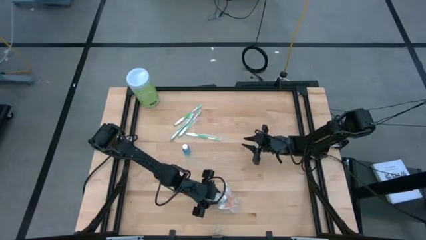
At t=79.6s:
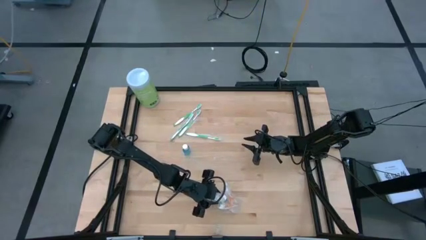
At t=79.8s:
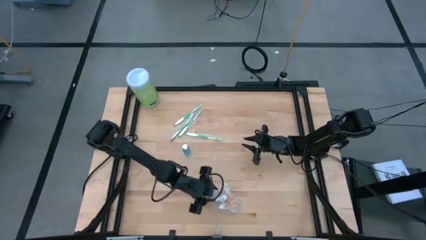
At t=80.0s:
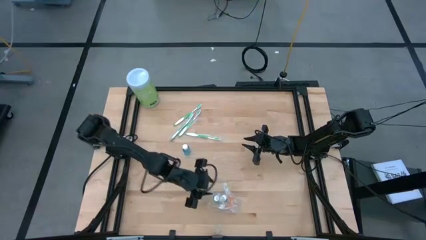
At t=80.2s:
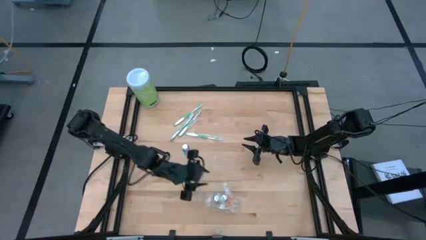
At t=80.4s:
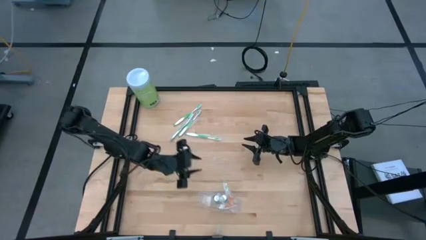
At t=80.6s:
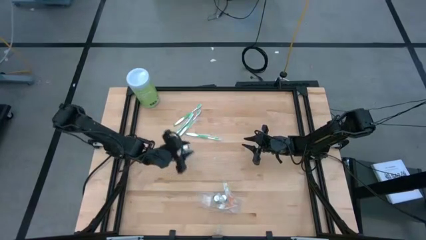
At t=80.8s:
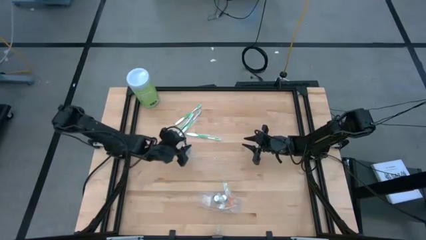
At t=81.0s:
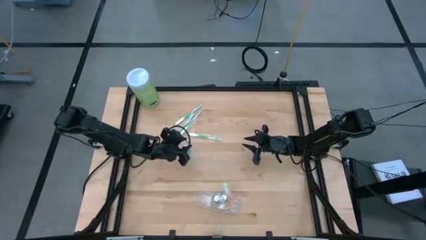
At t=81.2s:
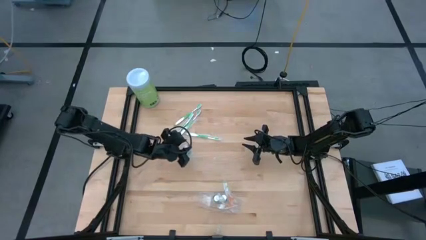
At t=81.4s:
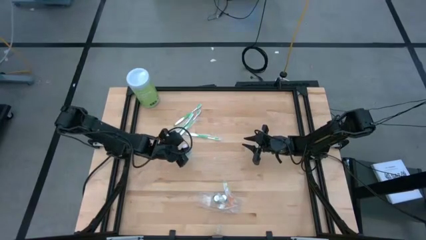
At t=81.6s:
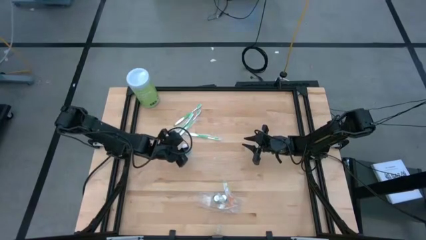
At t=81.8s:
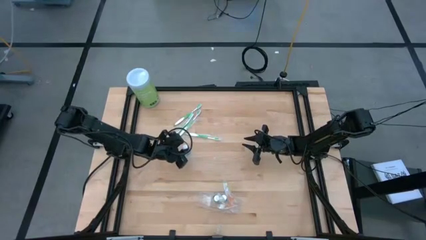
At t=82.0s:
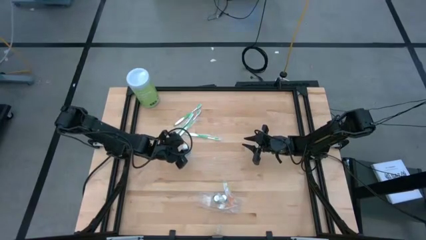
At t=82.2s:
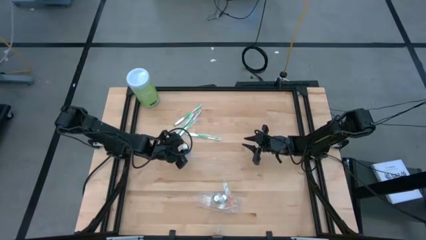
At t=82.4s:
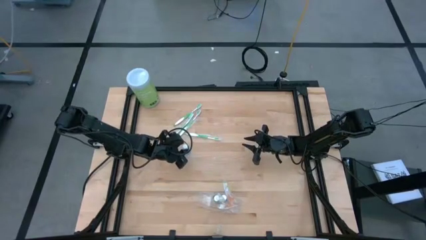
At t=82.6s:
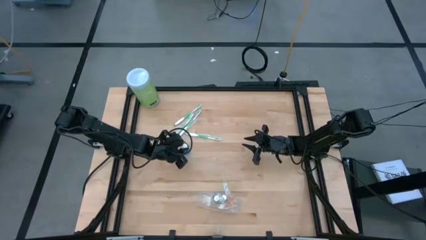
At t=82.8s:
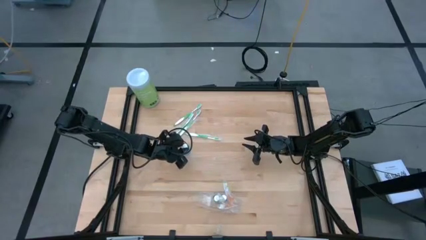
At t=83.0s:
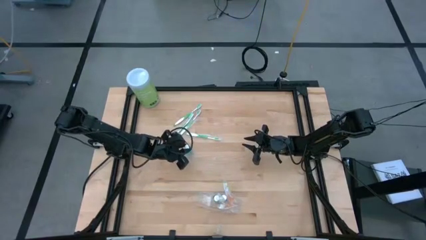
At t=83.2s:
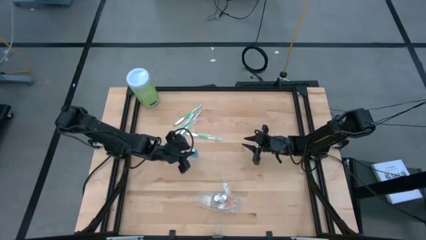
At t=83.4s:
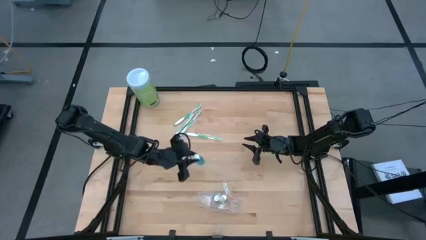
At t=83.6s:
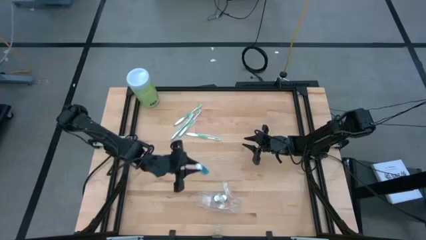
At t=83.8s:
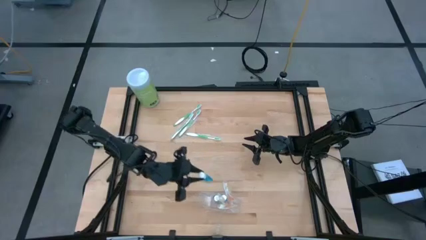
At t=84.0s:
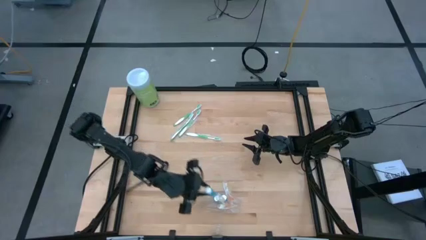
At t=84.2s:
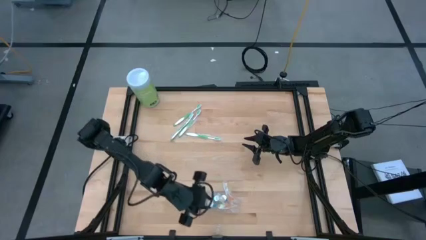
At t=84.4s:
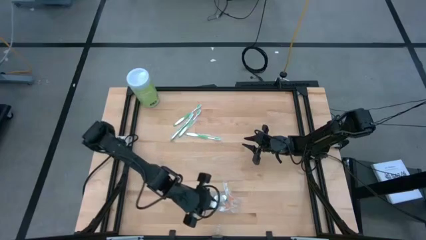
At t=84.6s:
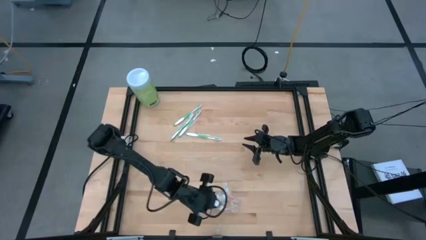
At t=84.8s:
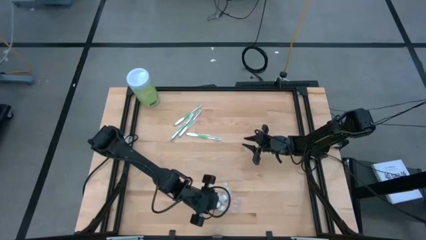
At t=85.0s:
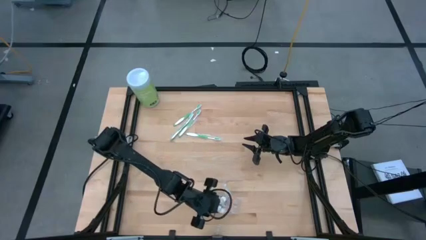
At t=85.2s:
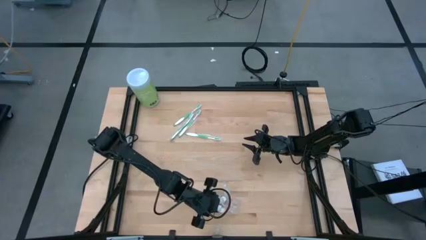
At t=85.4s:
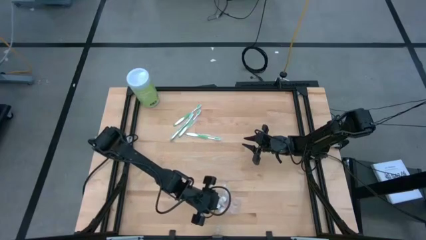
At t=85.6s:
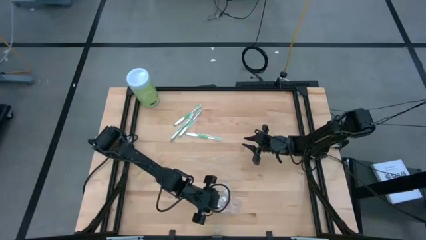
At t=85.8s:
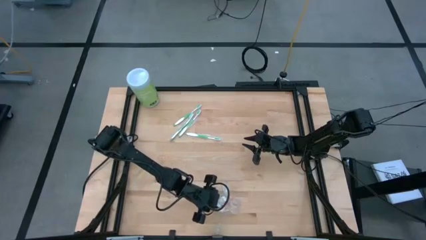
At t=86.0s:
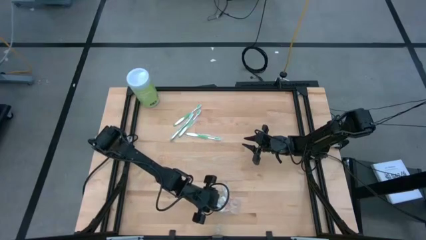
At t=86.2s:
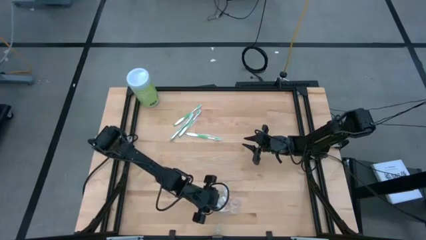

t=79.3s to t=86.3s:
Task: Pick & Place toothbrushing station
Put the mouthwash bottle into the transparent organizer

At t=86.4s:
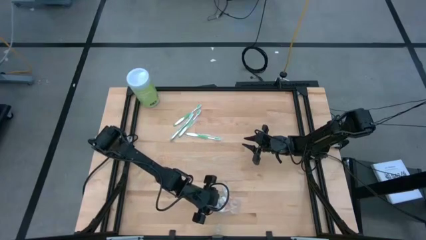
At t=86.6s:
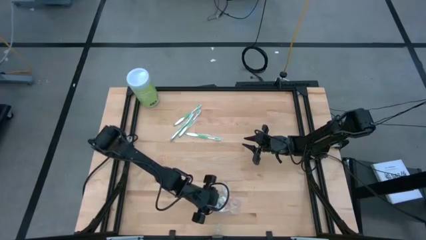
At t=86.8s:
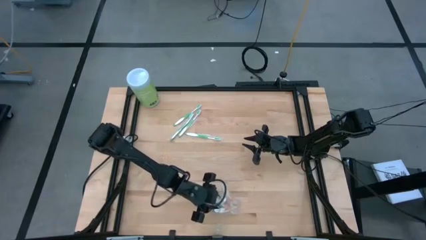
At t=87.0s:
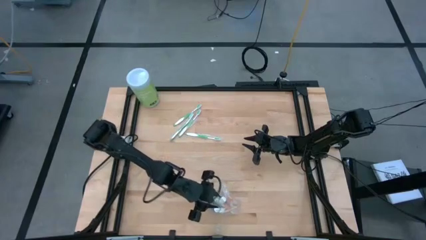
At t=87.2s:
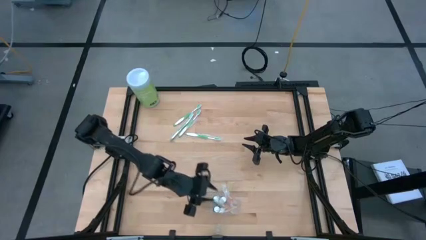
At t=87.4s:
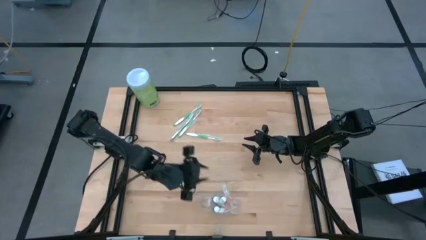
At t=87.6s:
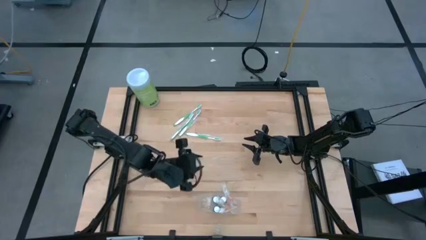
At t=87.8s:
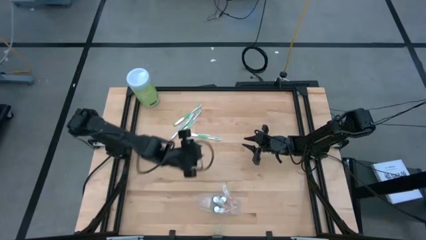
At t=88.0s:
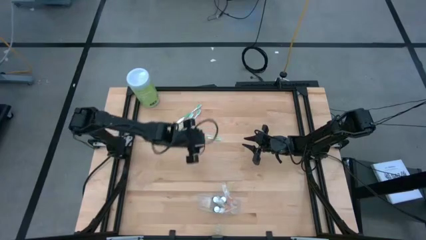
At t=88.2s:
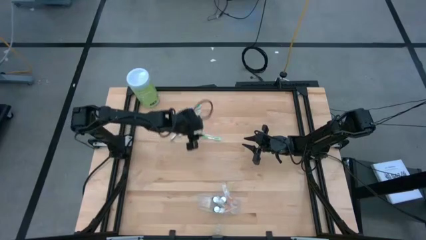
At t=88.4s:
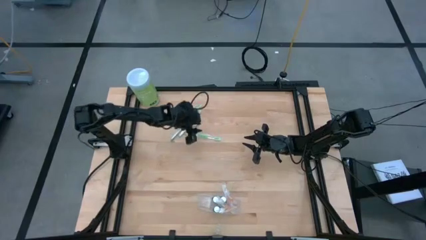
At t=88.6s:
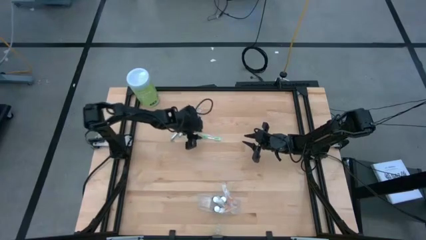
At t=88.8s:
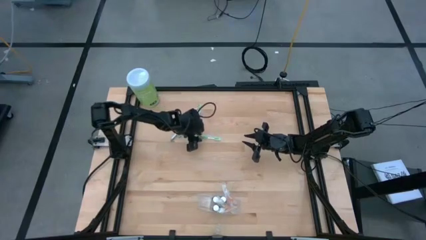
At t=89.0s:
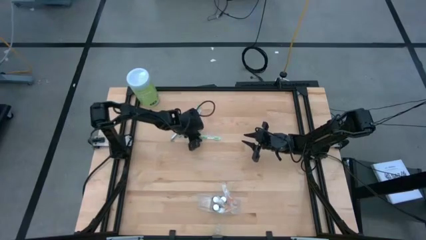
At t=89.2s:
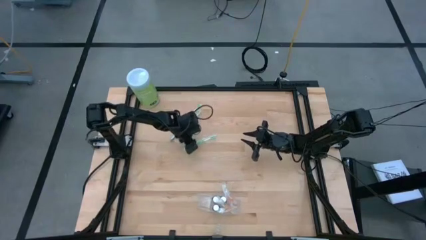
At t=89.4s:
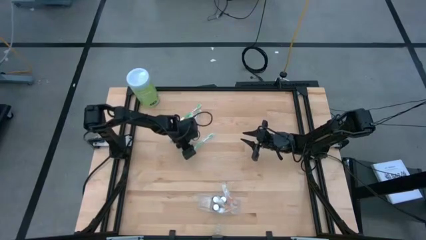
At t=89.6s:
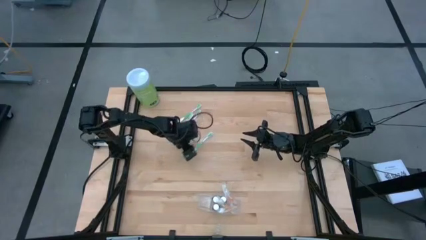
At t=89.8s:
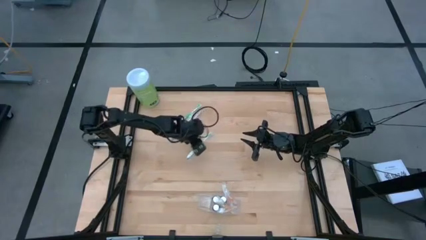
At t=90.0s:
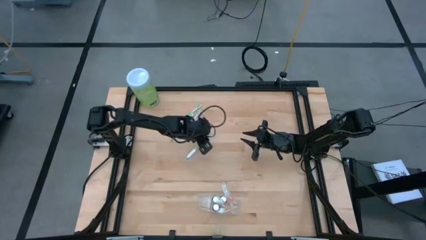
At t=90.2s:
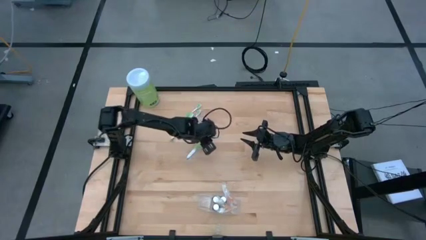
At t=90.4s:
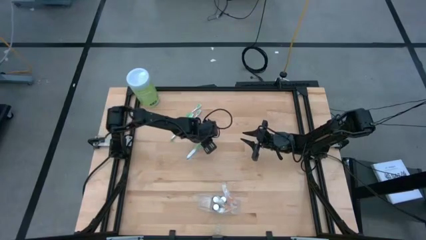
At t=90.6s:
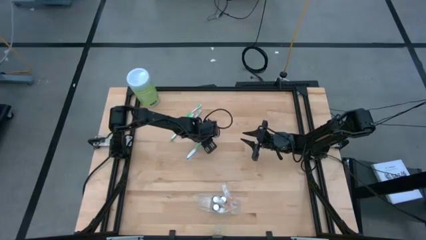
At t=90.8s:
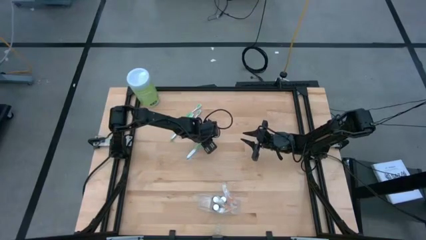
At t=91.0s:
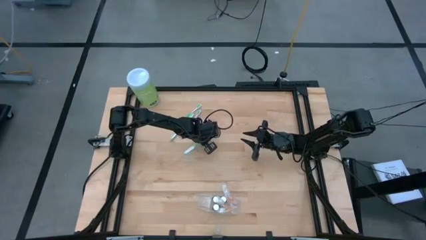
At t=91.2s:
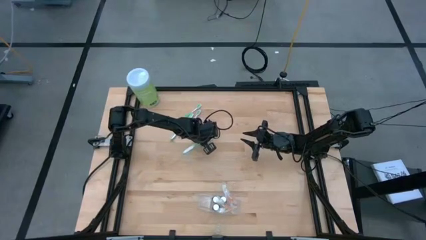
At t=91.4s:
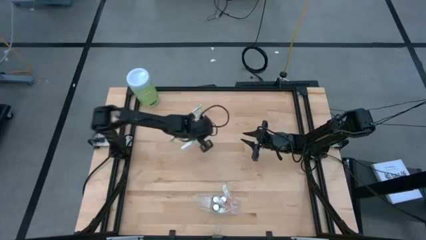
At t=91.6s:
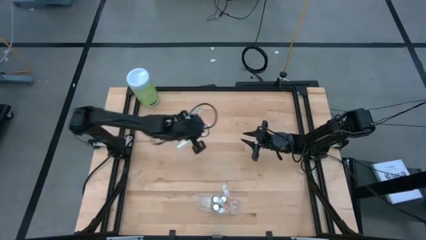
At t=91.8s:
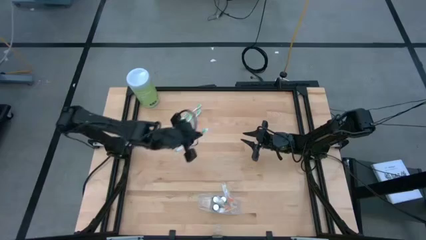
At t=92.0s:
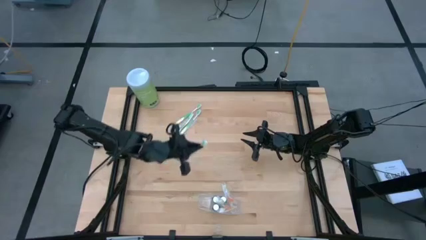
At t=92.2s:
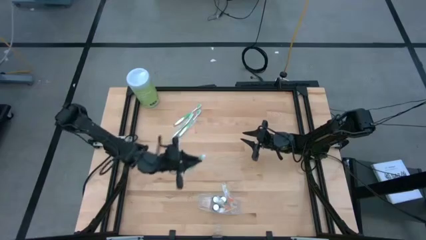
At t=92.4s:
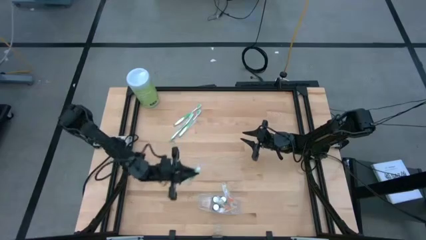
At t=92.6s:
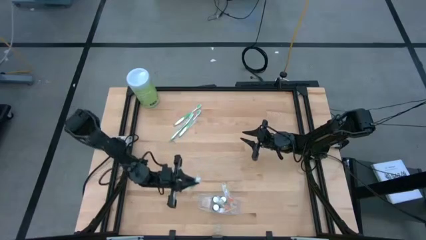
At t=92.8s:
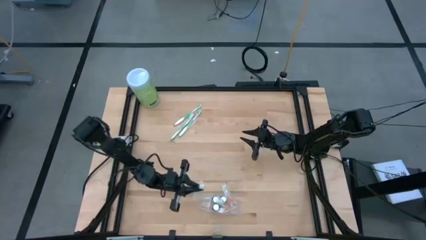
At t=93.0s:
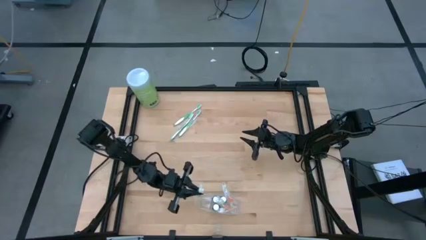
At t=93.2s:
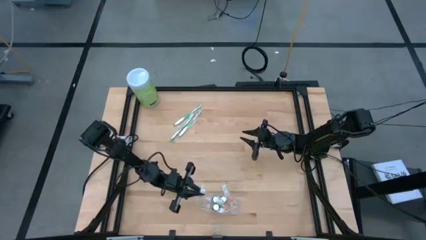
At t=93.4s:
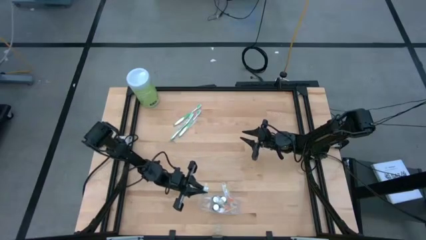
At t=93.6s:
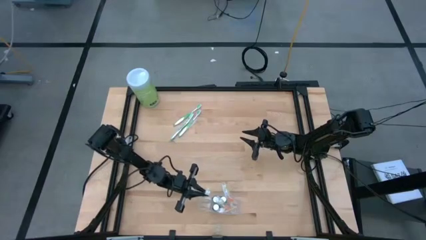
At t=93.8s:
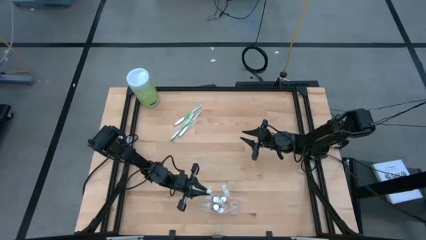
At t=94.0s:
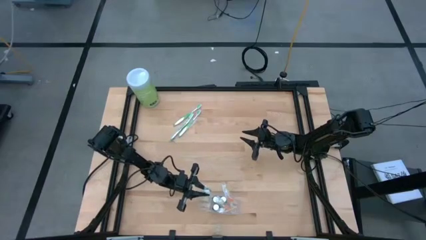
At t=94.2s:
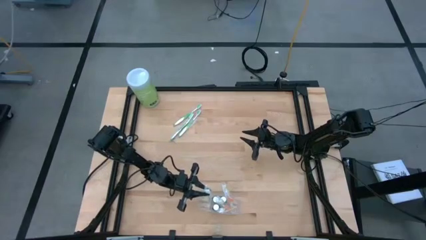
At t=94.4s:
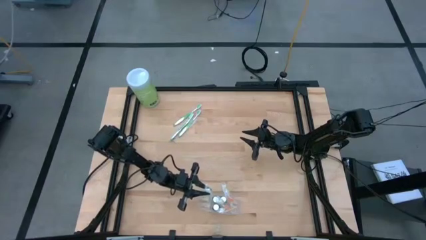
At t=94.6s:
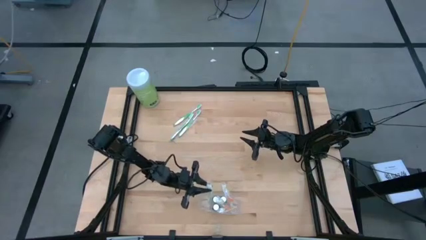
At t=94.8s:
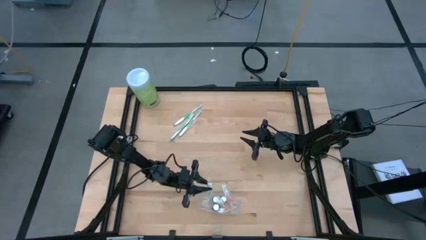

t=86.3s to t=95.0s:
Put the green toothbrush into the transparent organizer

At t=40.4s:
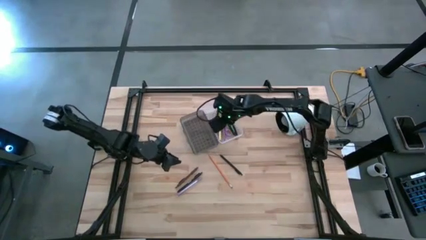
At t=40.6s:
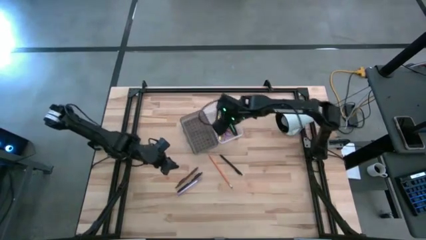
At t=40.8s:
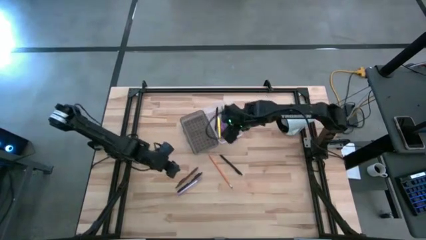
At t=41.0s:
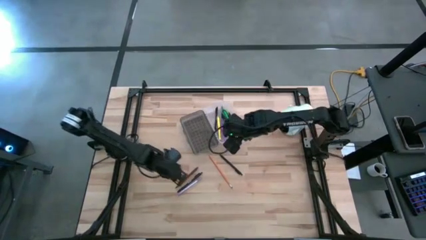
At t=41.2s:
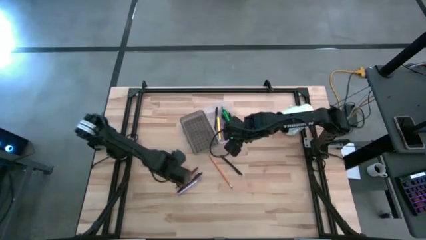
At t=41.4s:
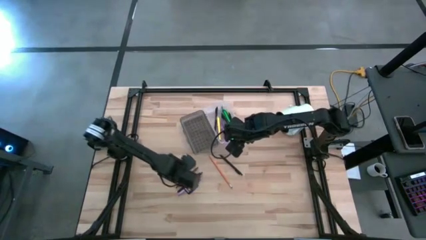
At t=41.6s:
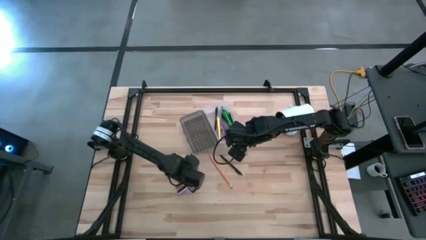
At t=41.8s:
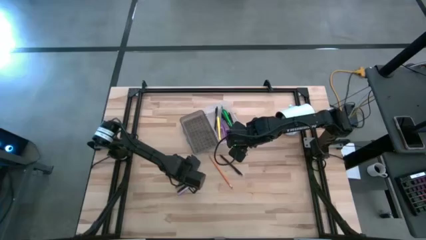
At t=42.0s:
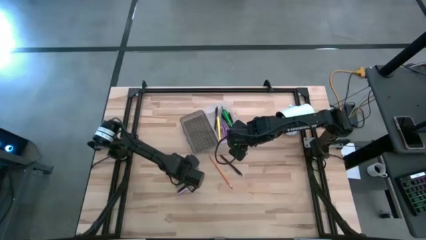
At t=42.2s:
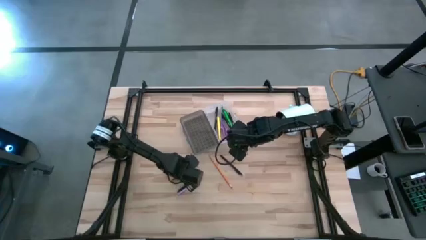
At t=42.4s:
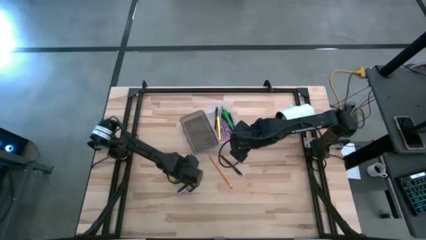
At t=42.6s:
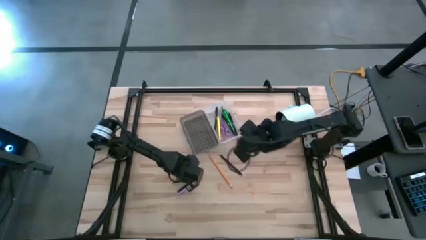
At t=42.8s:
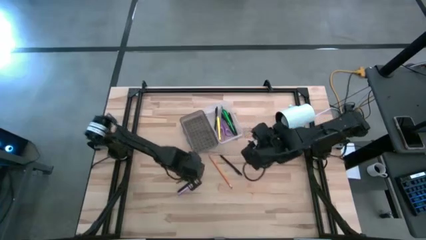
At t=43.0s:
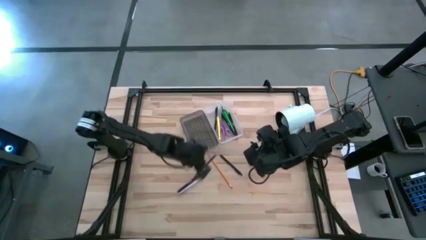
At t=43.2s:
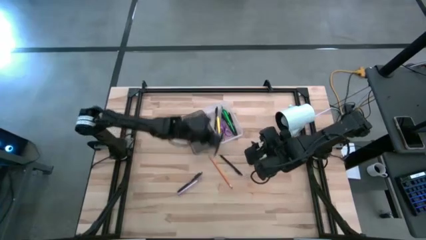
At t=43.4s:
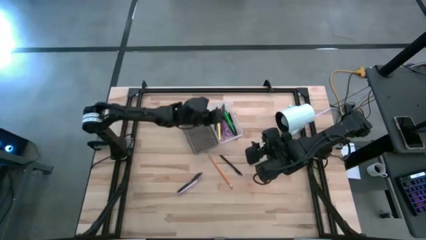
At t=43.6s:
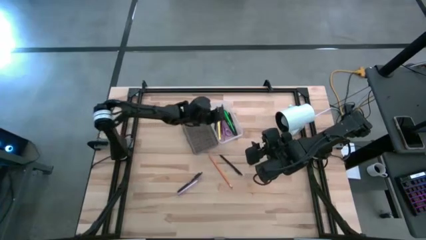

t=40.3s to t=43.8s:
Task: Pick & place school supplies into a supply box
Put the brown pen into the black supply box
